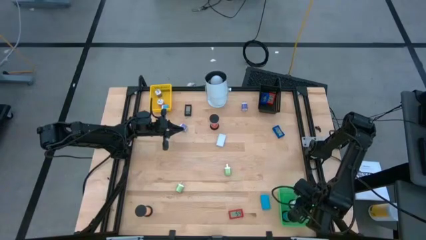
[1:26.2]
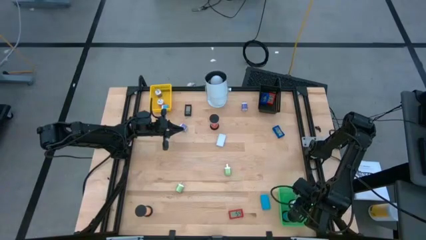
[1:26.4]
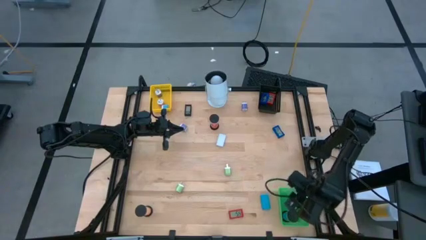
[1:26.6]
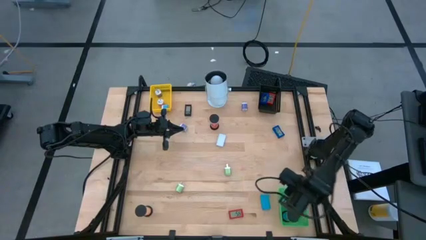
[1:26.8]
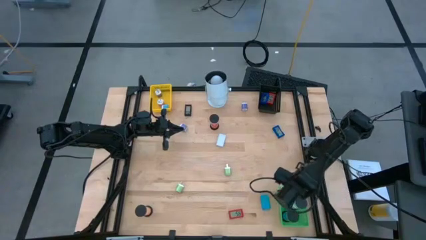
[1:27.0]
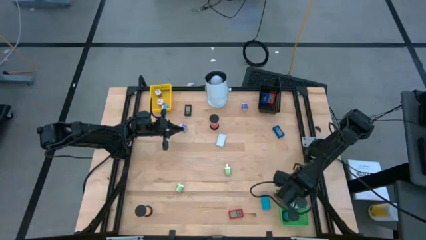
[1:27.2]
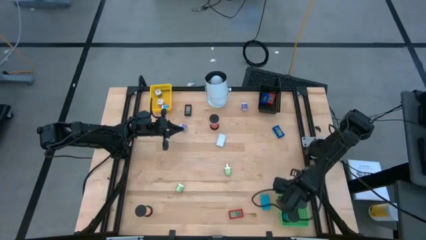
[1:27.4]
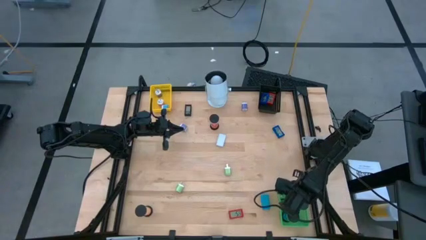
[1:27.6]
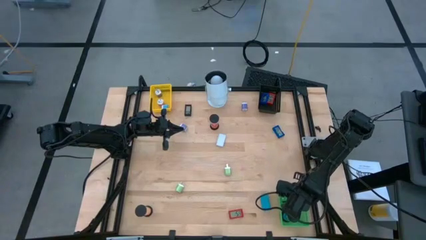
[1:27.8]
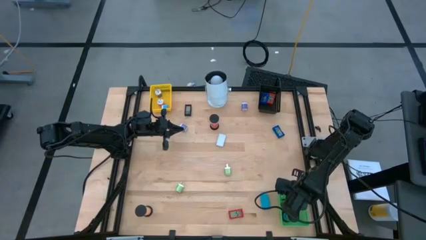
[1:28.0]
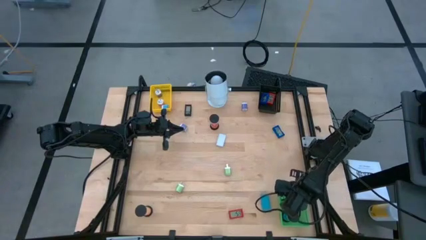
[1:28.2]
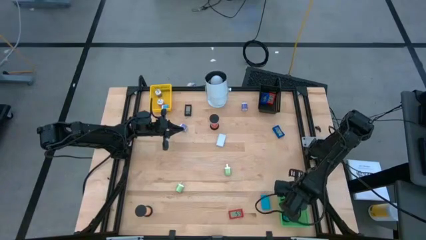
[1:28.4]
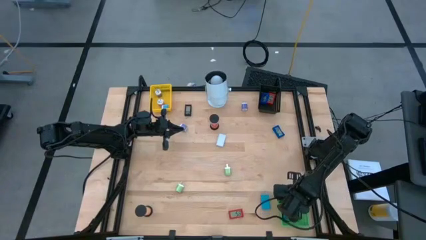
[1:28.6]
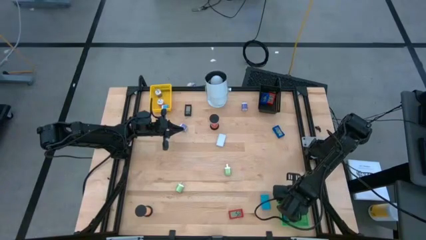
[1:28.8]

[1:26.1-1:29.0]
Task: Pick & Place Office items
Adjust the white hourglass in the bin

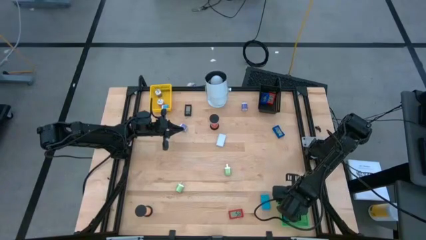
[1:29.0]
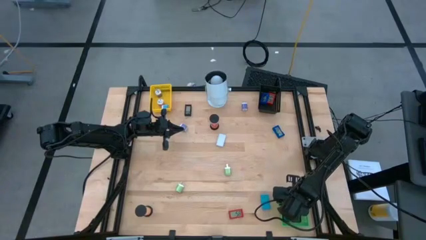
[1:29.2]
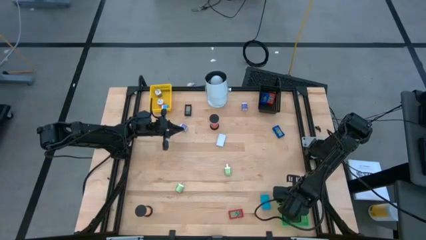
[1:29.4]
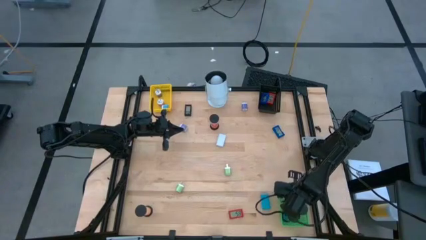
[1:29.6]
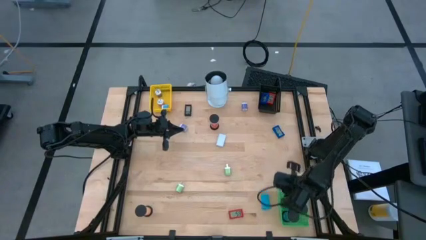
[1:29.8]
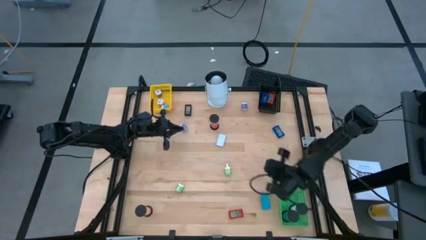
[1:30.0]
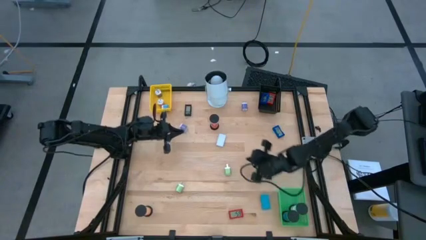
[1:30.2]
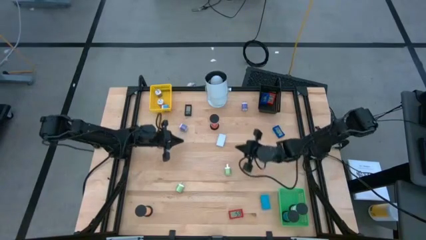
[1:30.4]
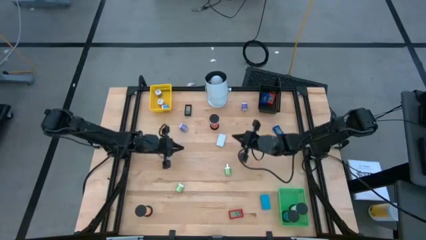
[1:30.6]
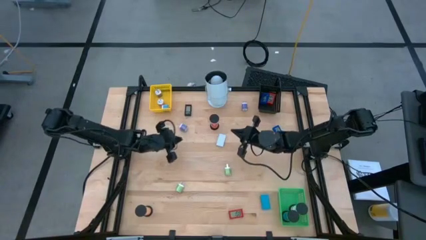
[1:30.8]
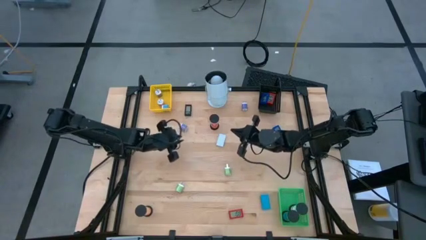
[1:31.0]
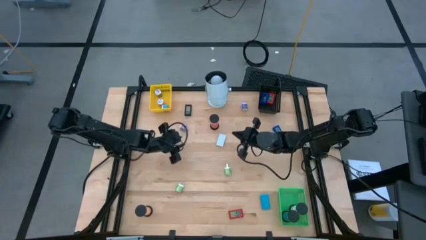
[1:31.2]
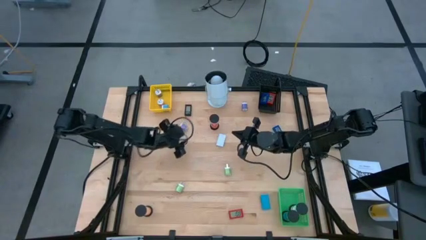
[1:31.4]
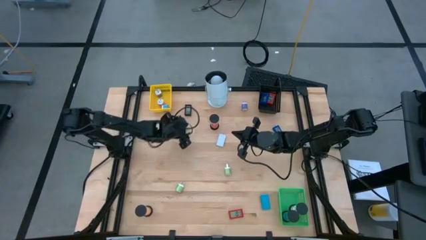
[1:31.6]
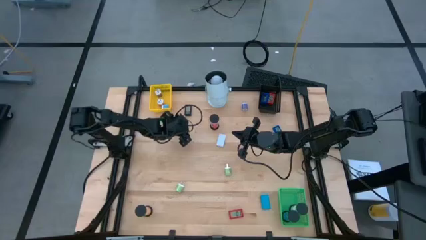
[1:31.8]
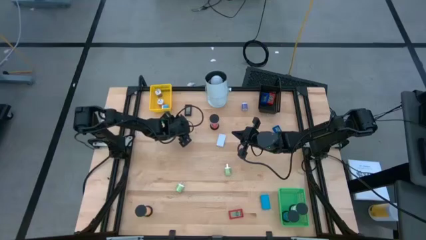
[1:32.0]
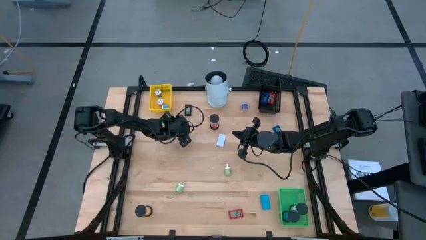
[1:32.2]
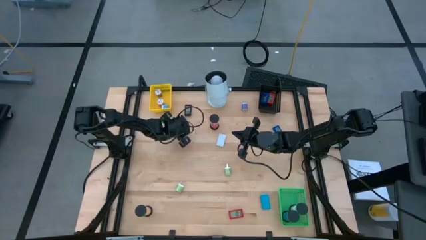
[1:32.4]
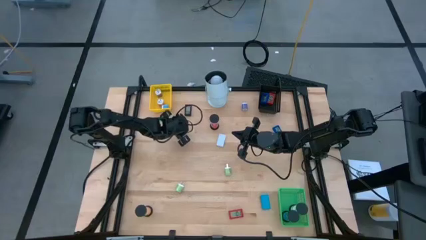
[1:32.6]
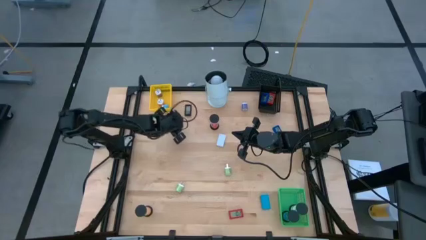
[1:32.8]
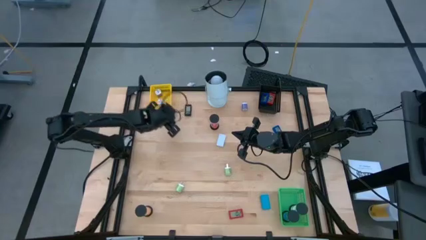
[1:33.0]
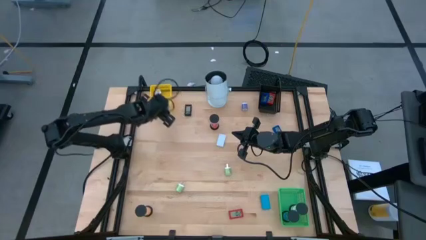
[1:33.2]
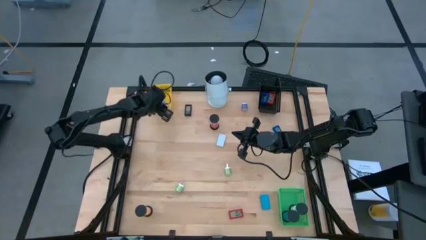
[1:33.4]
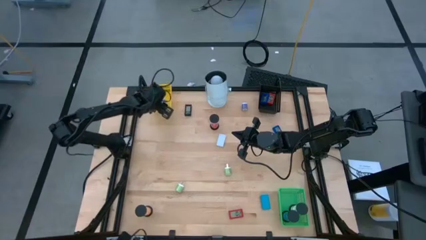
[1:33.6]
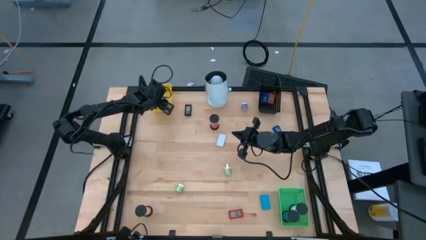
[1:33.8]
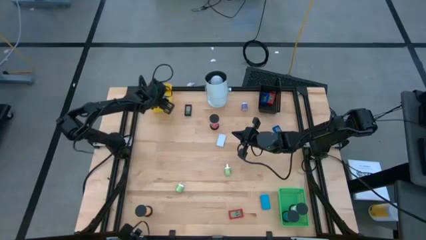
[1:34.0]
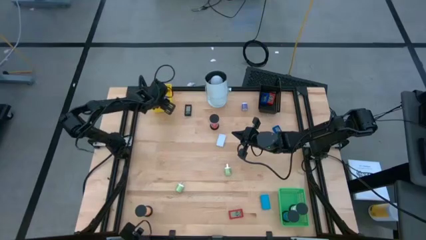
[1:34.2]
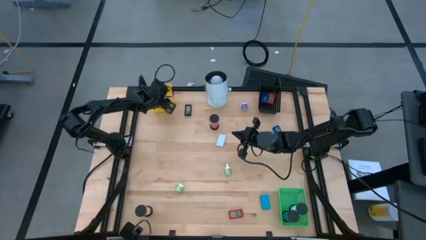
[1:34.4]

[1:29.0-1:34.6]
Put the violet charger adapter in the yellow bin

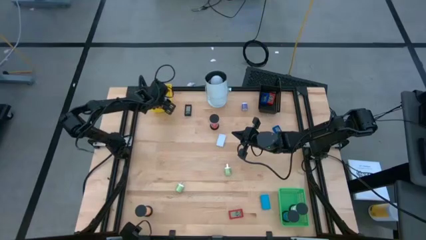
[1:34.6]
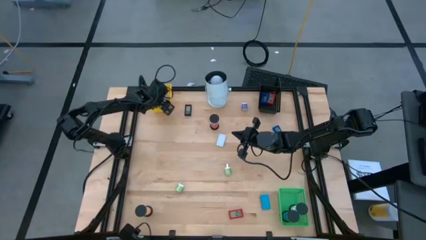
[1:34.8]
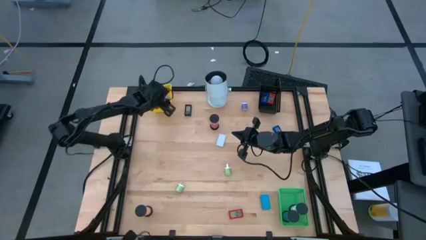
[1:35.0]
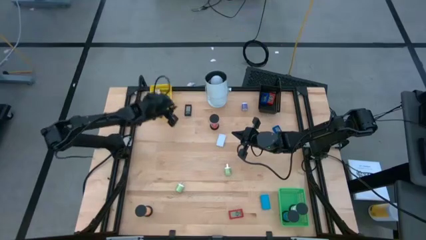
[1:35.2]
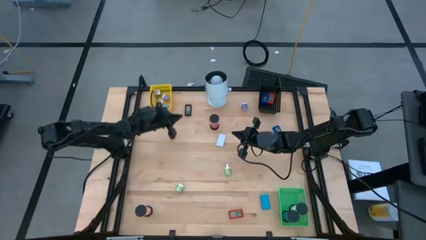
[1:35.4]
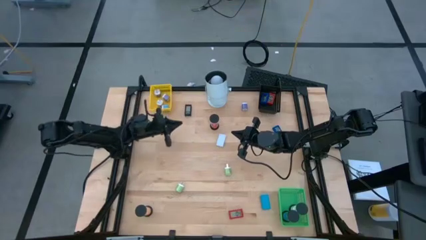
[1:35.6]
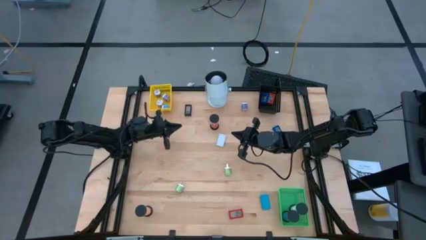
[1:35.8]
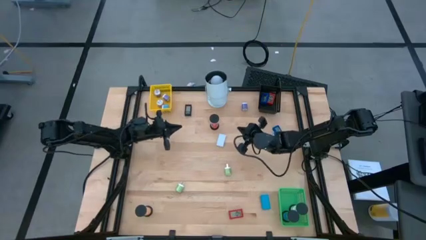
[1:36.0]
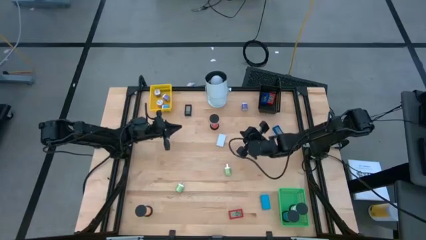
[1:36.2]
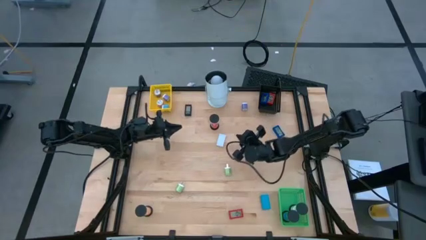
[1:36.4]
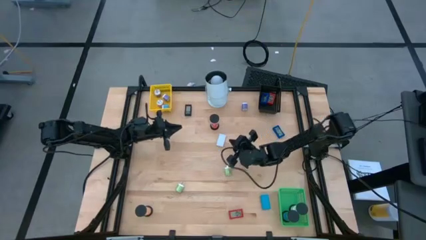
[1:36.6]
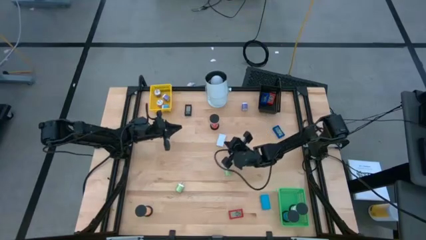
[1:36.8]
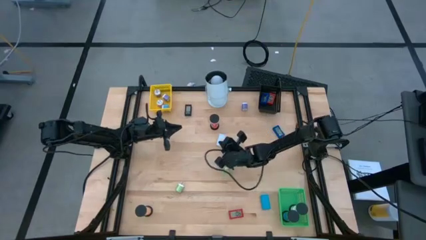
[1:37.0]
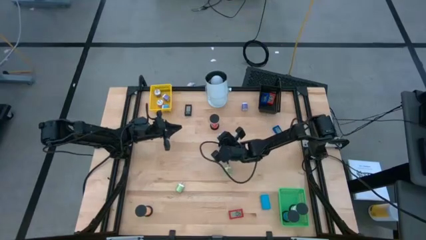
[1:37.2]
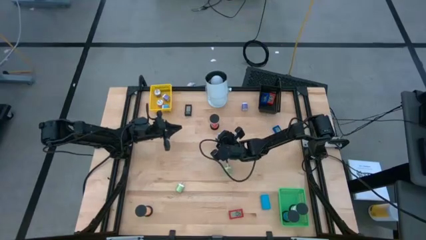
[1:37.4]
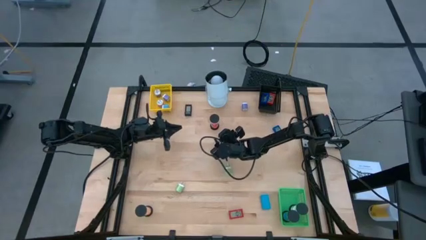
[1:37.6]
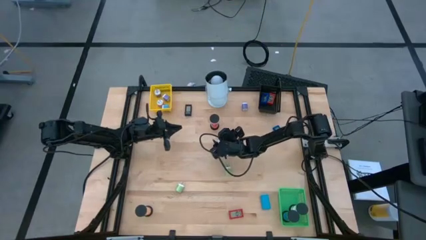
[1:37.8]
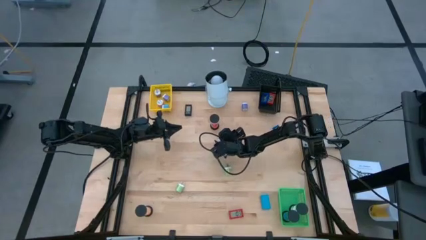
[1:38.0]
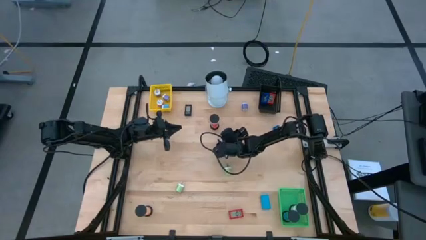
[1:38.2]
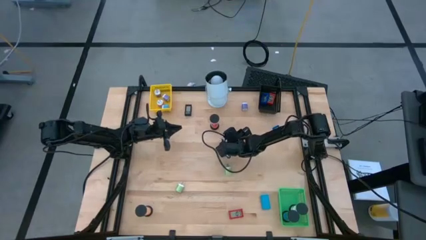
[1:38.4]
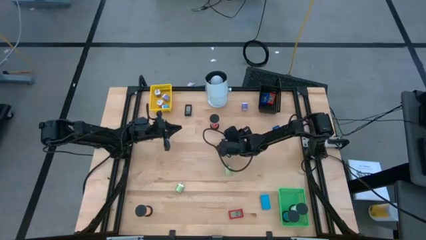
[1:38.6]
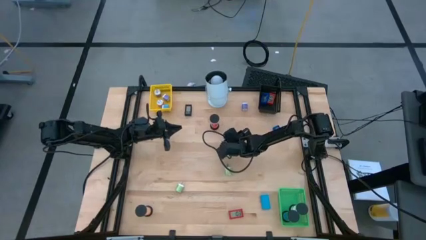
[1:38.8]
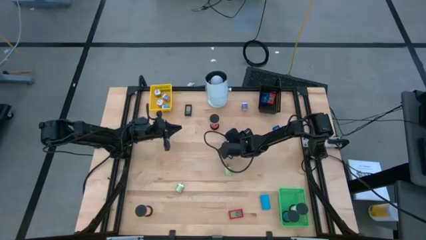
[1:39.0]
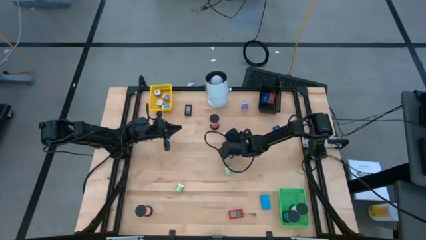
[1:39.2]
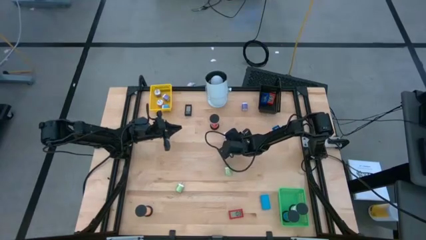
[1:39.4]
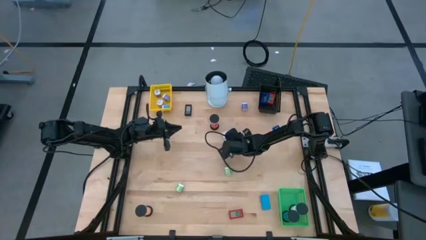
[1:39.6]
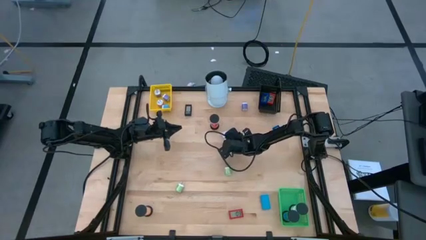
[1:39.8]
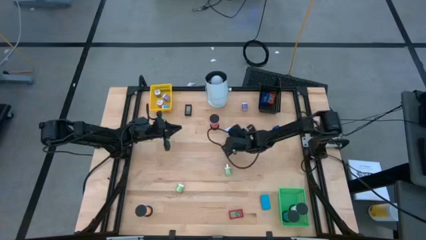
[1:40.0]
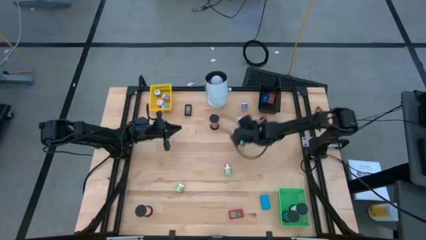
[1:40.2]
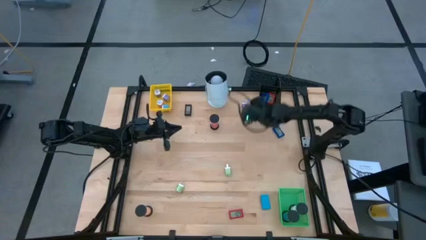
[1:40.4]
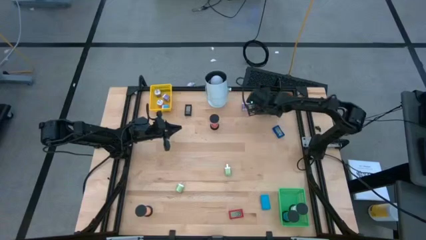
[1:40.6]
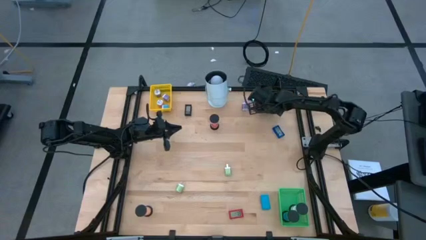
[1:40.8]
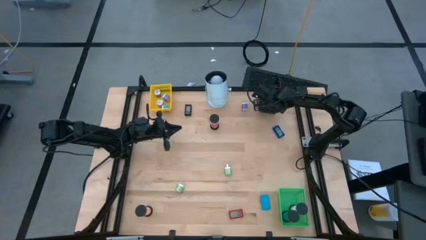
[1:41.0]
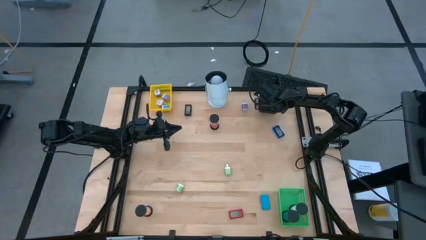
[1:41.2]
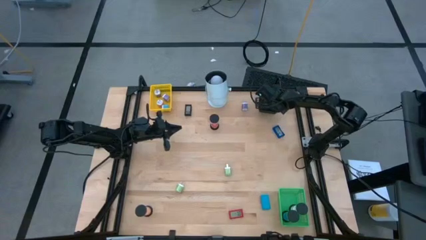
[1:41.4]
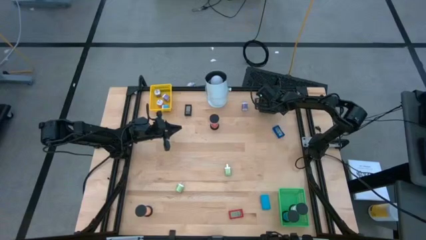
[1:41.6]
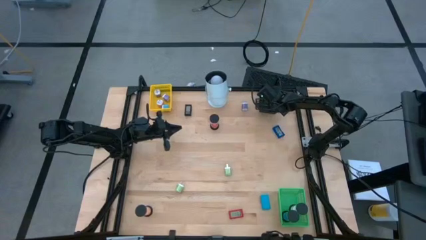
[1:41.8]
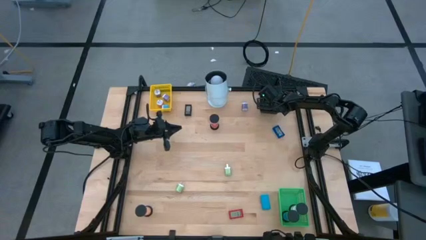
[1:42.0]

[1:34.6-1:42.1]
Put the white timer into the black bin
